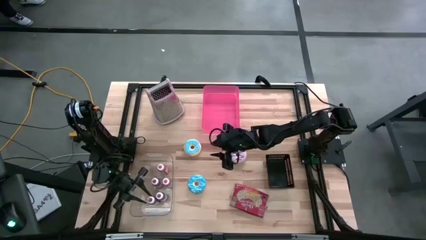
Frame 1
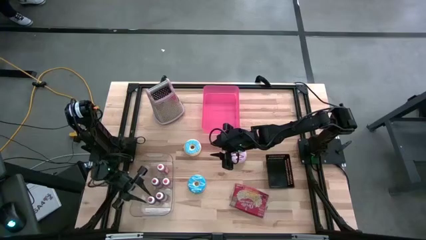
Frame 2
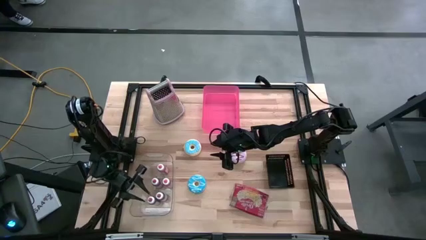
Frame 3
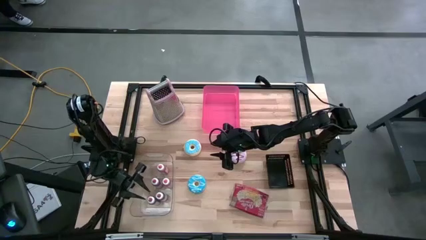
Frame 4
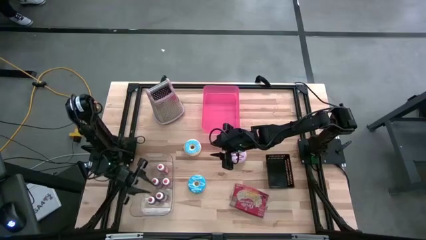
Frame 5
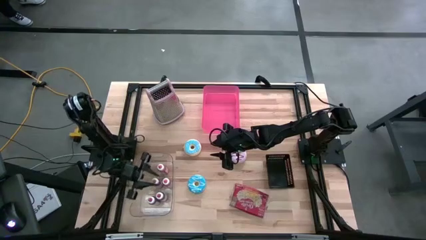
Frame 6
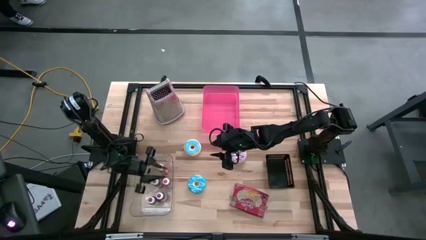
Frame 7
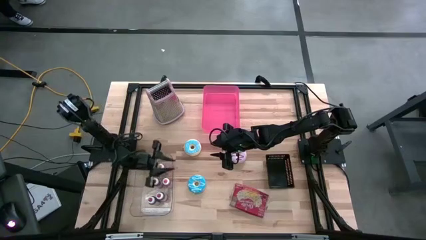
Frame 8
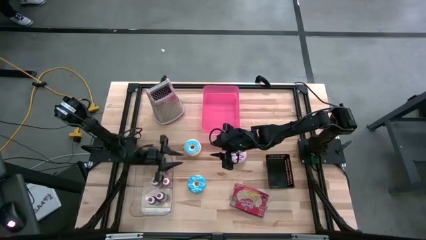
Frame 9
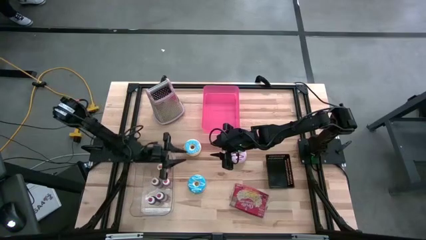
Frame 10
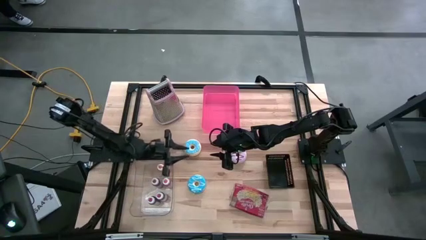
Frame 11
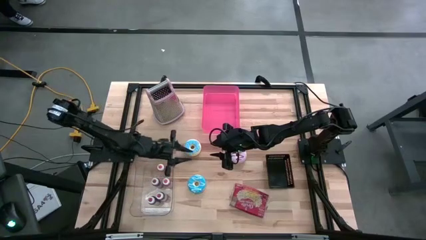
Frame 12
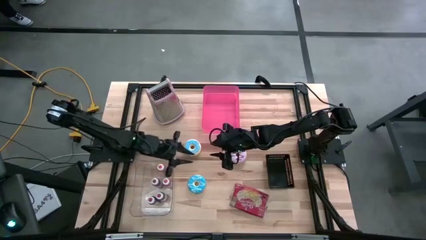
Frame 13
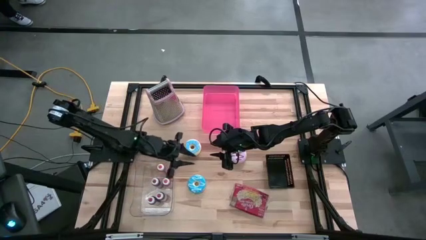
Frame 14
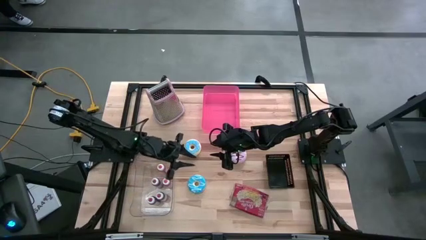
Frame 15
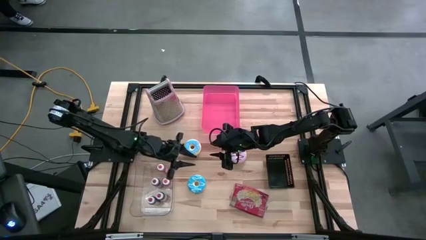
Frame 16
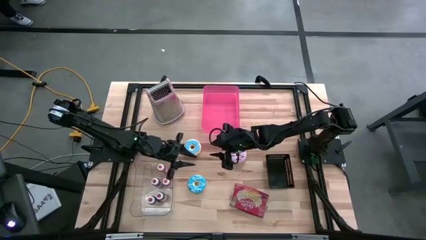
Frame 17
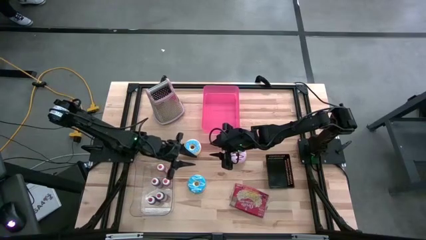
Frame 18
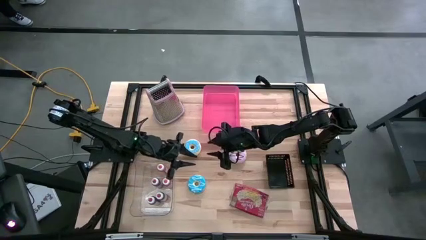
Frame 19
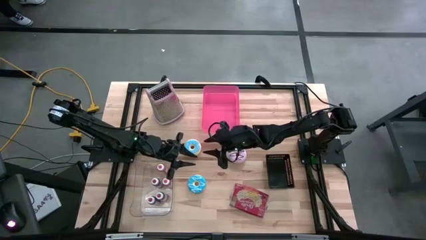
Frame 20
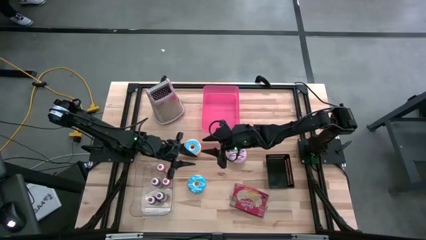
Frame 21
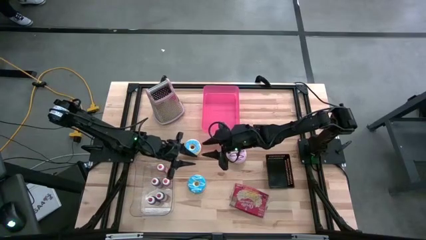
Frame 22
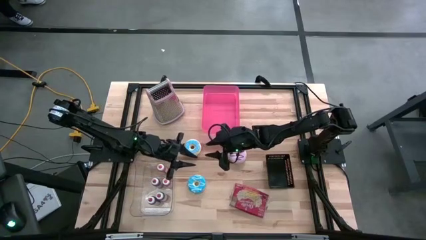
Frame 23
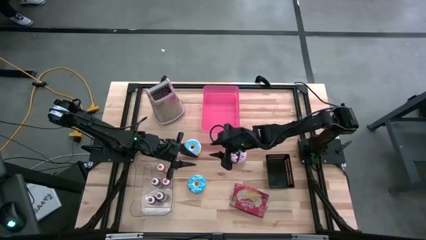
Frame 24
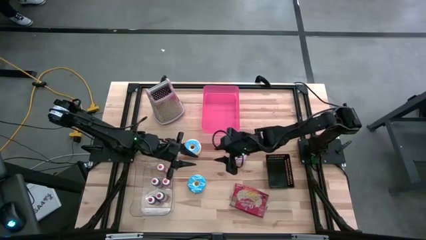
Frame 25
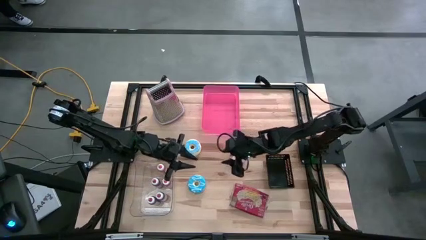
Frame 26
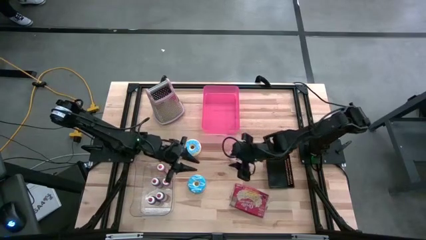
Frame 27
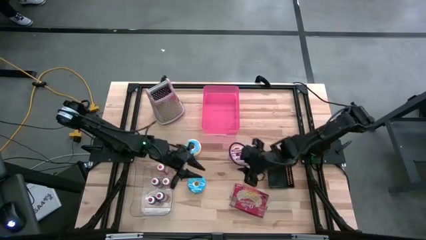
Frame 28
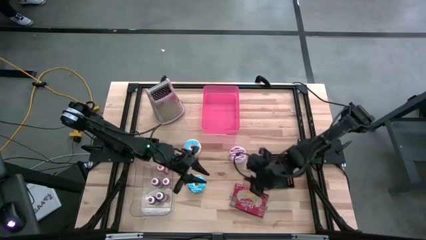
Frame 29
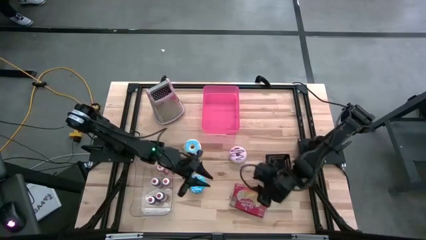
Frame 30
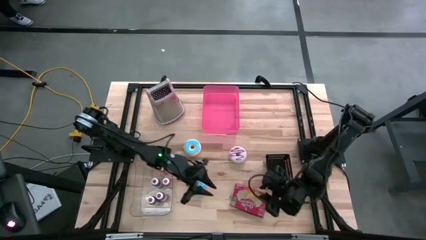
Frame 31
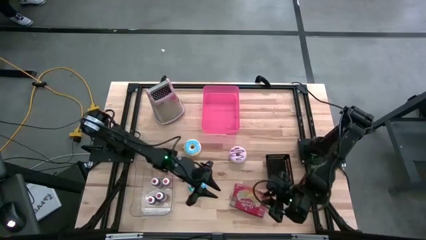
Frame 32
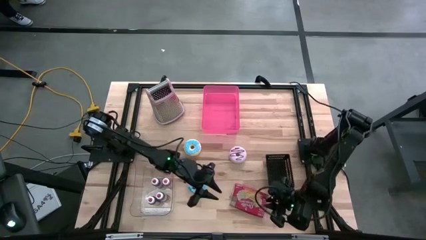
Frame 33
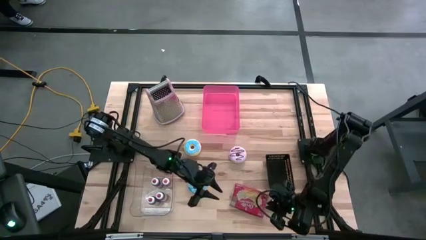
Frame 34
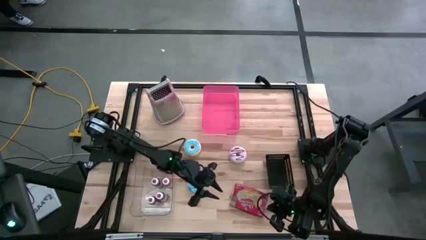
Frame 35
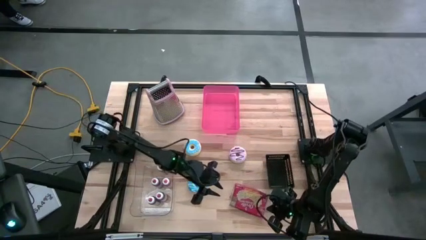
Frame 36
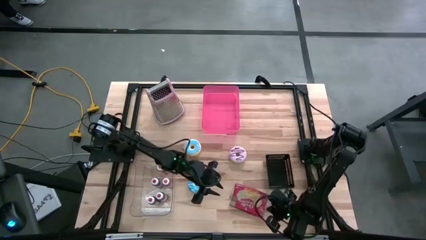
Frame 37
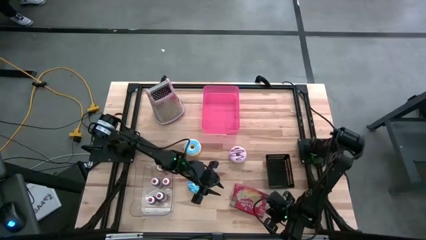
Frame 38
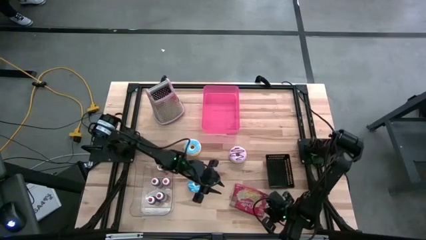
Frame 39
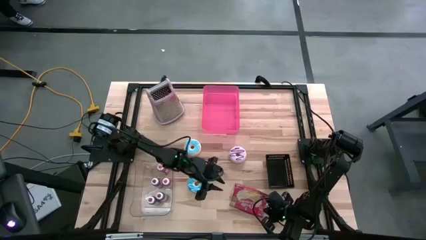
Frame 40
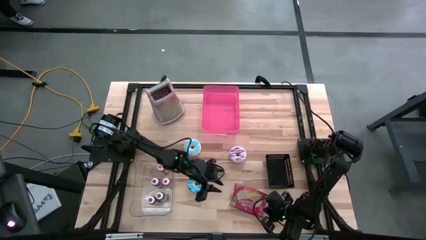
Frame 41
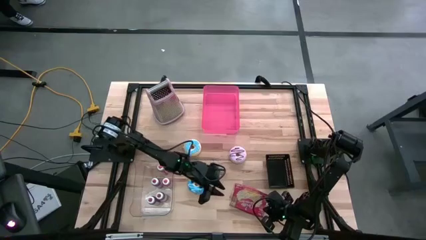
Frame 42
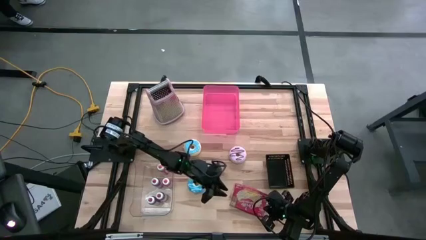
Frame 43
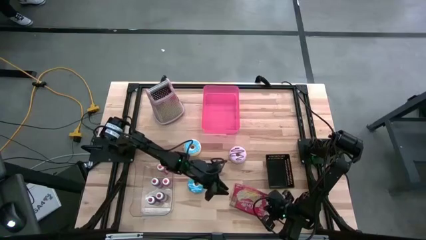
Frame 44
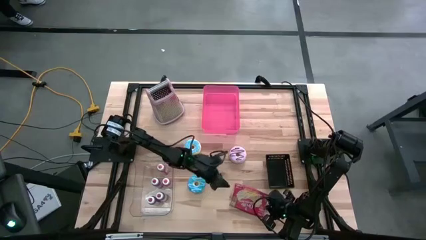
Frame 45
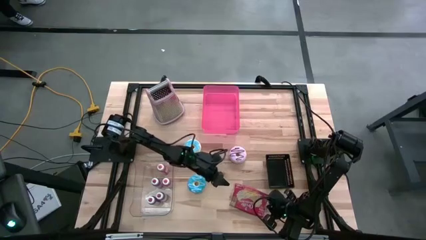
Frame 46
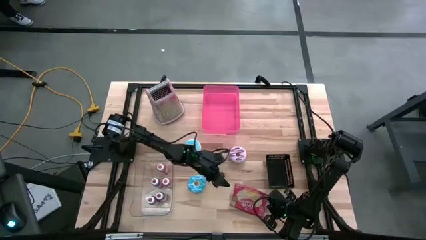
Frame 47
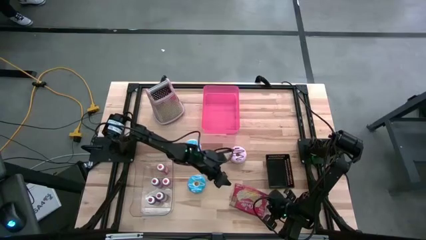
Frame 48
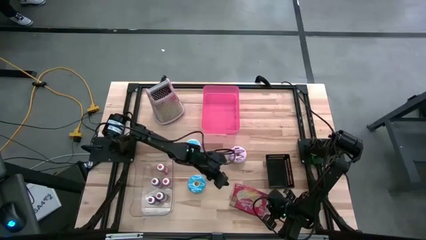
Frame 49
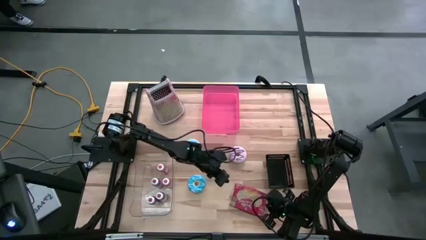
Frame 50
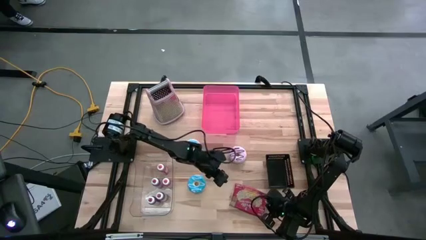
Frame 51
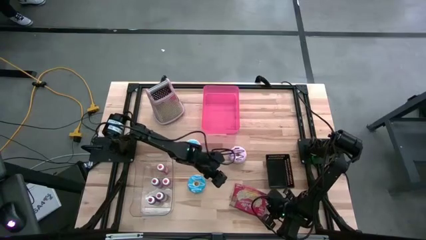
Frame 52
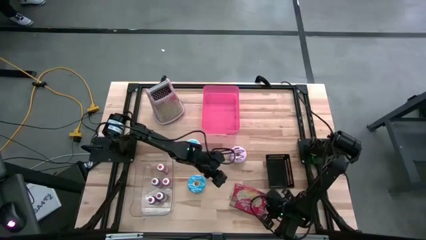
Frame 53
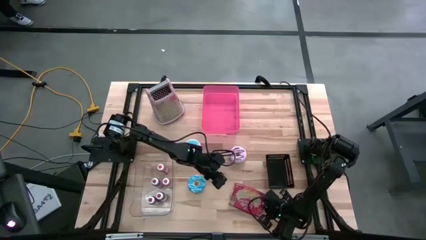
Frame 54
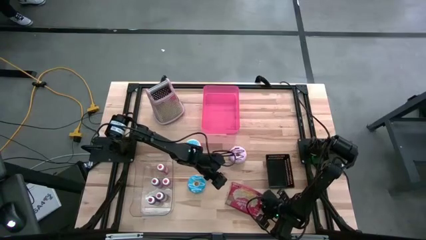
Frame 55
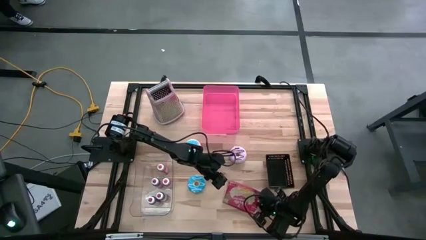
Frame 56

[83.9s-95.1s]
Put the popcorn bag into the red bin

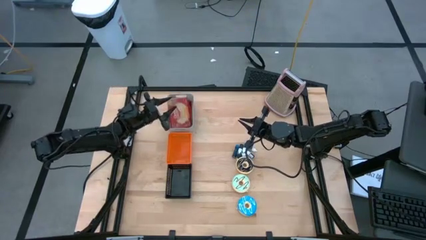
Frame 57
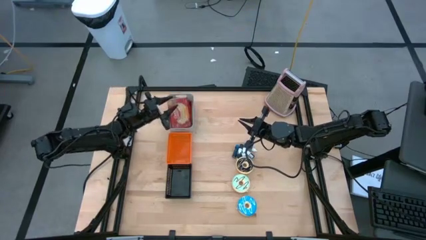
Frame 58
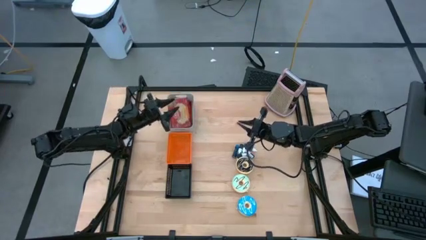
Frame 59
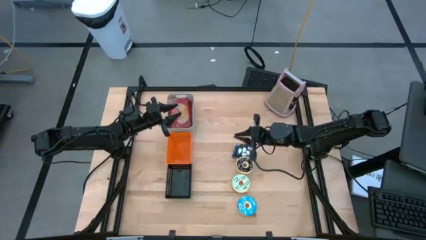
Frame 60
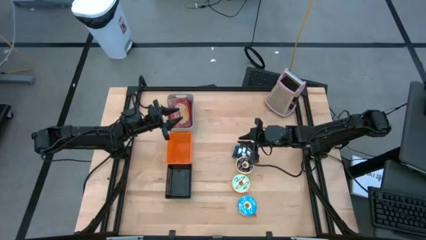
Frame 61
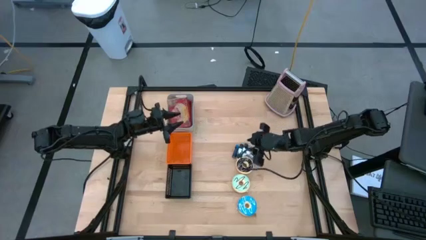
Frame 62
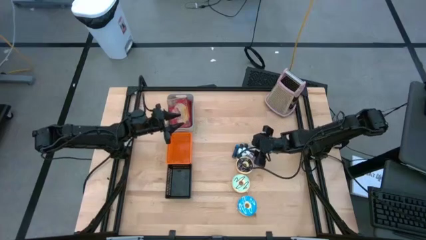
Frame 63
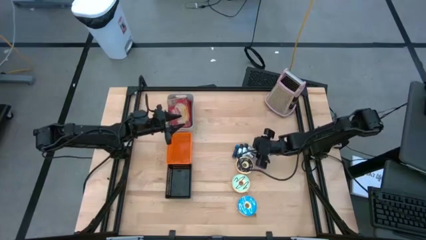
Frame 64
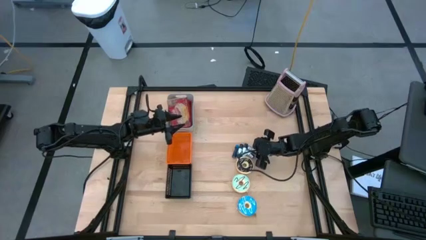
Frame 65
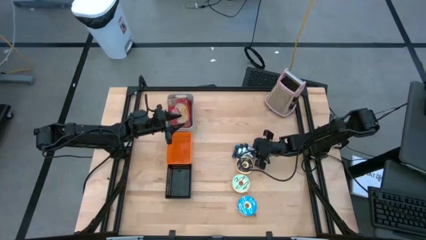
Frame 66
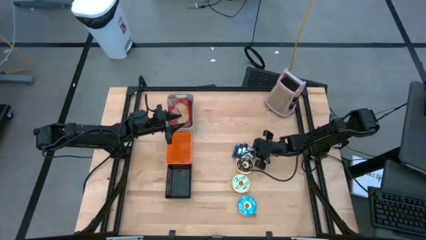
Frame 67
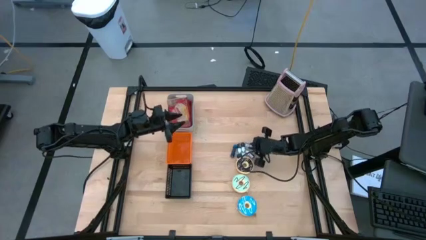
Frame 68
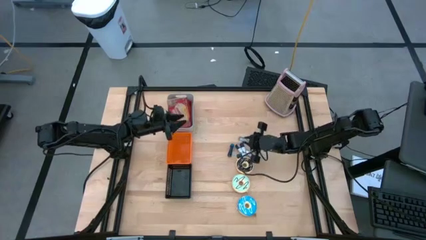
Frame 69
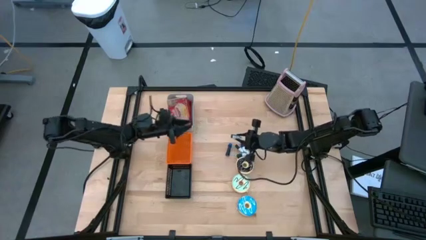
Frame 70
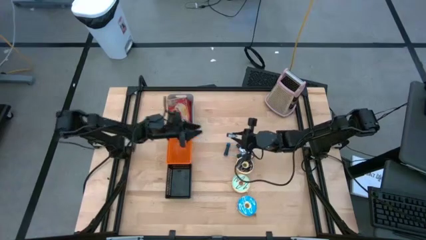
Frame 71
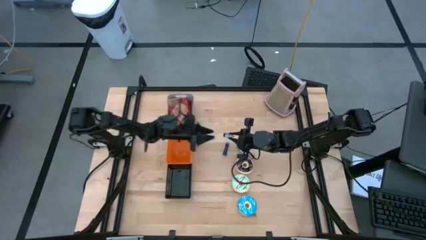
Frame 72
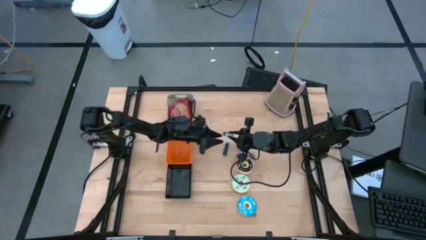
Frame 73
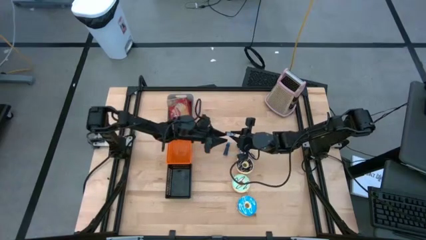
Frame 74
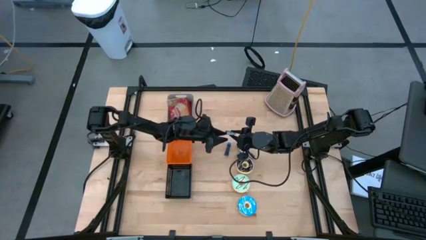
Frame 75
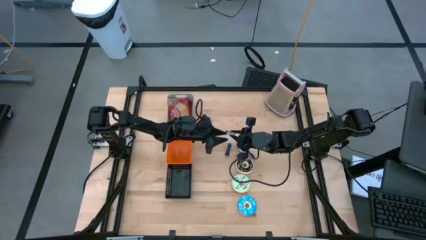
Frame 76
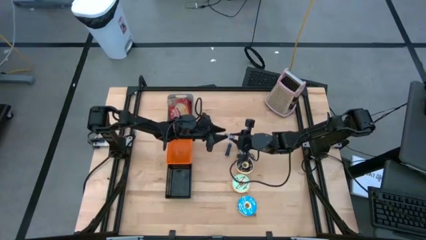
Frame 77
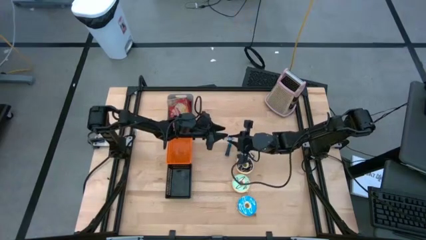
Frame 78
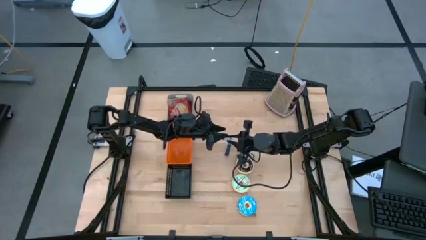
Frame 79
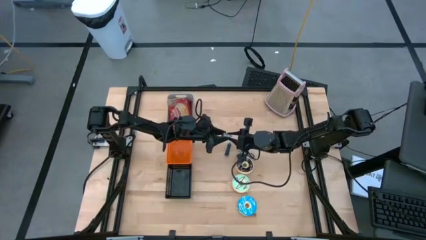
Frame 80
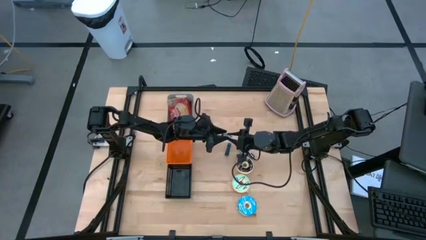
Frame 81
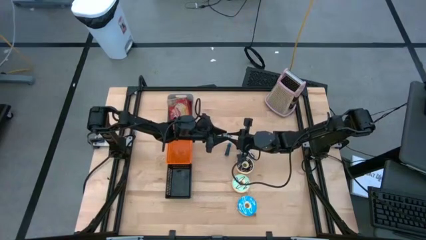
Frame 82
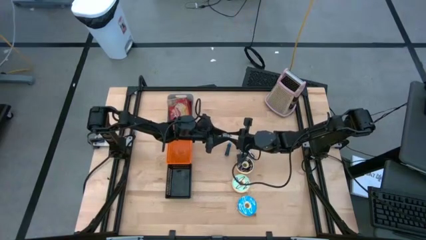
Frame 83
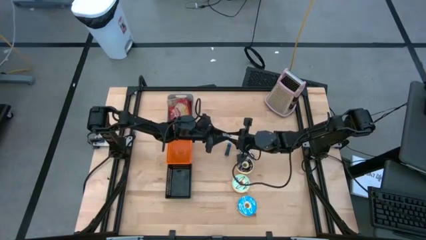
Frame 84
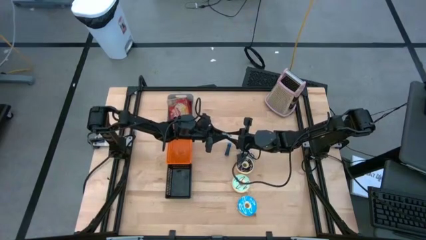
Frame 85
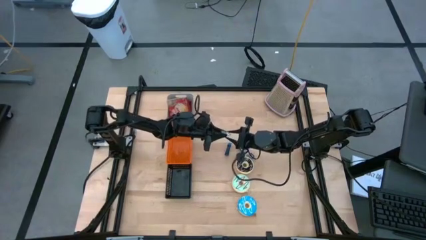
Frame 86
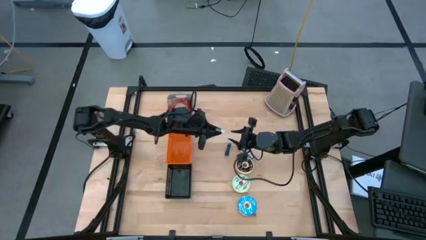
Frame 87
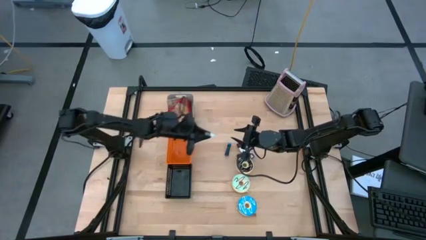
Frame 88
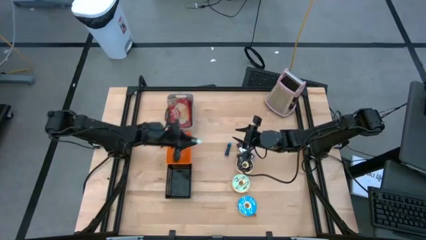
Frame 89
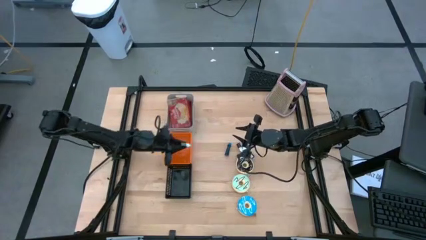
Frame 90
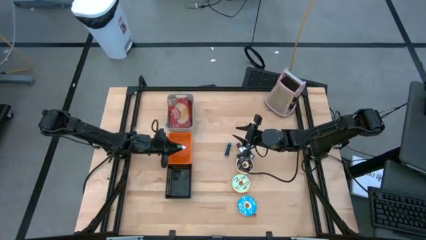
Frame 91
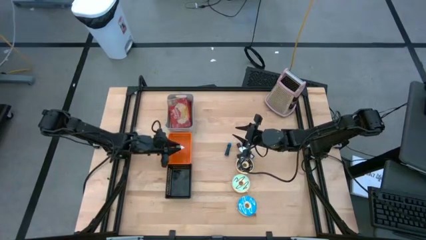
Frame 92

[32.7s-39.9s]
Put the green food coloring bottle into the orange bin
